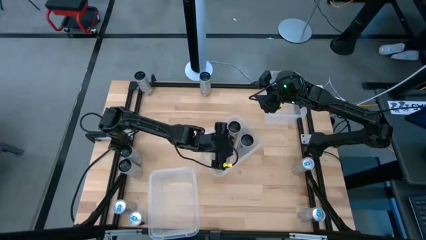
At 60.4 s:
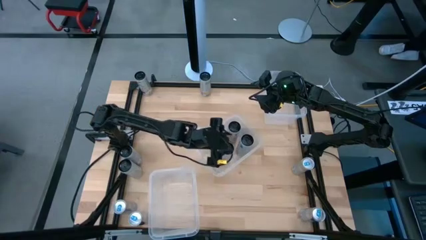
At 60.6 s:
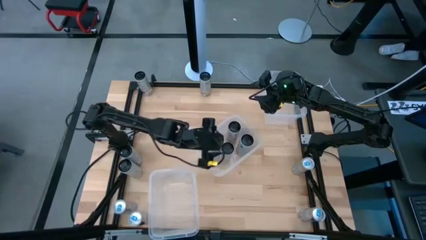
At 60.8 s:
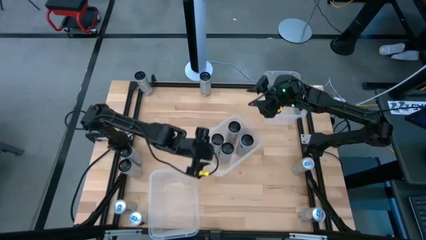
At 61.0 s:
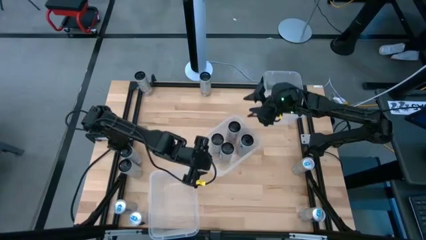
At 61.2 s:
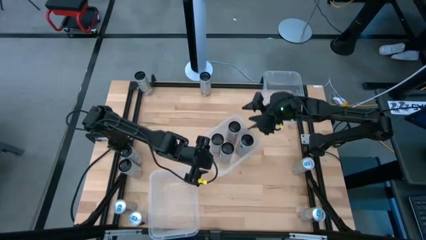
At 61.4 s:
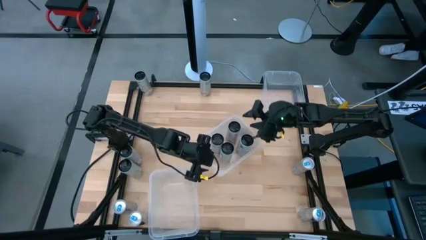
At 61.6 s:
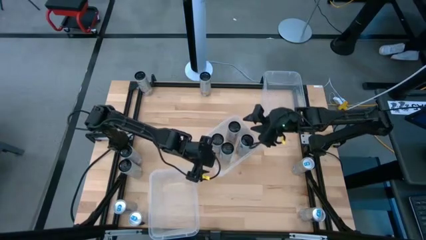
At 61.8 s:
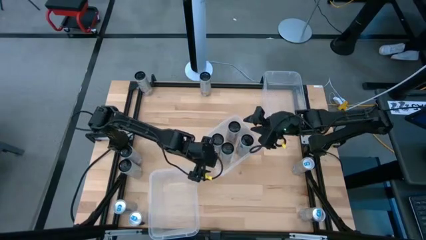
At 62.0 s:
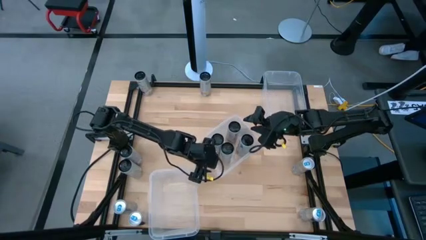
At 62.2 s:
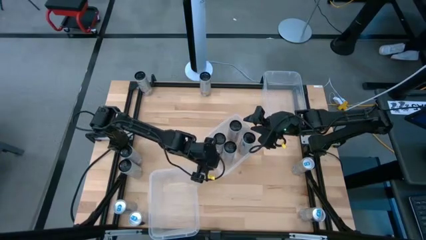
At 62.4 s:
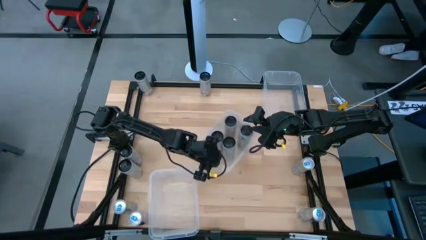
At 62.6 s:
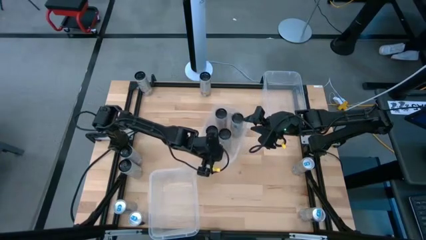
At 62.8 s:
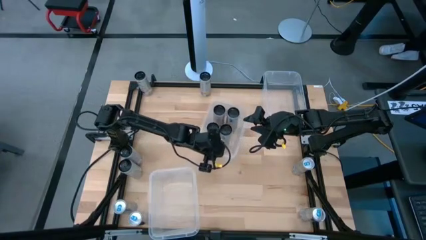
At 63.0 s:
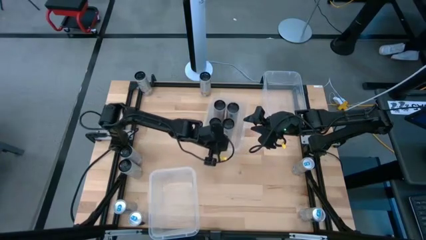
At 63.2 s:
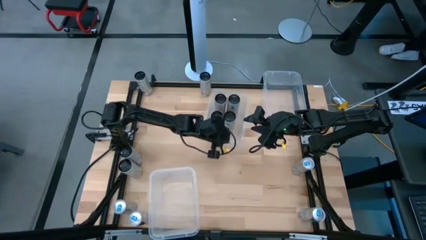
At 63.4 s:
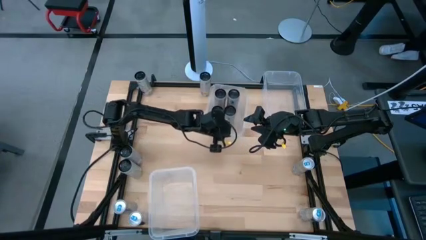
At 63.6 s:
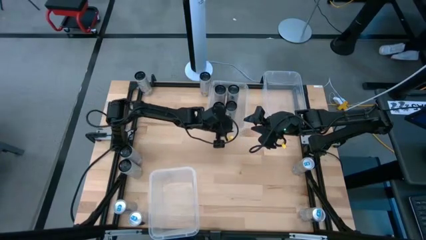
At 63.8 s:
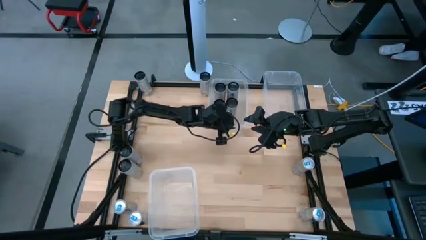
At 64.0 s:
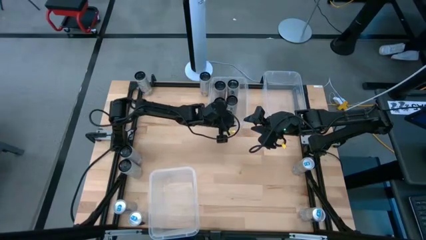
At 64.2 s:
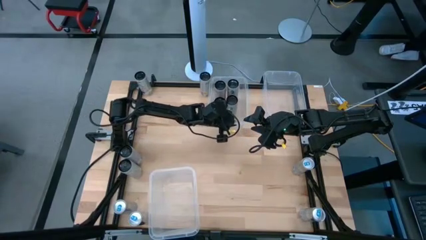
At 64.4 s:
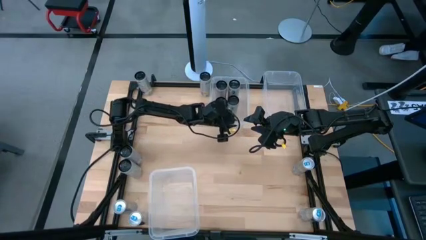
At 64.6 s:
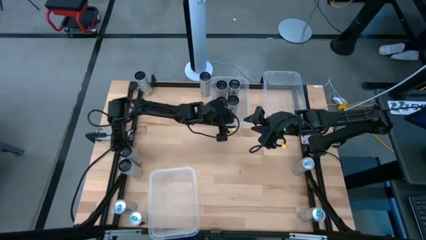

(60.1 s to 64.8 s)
Task: Sort soda cans
Move the middle transparent bin to the top center of the table

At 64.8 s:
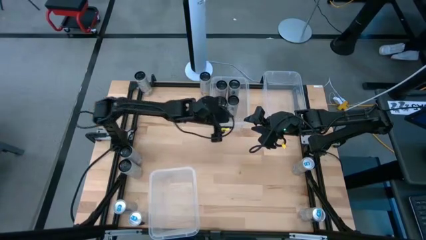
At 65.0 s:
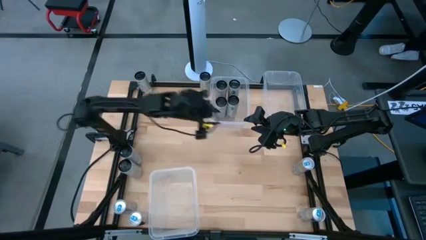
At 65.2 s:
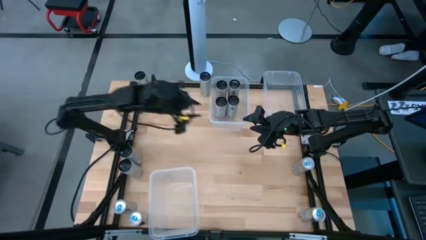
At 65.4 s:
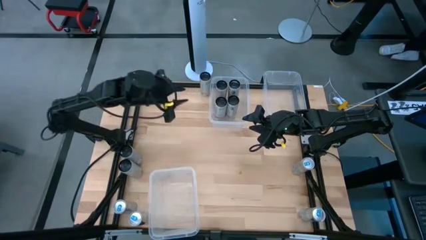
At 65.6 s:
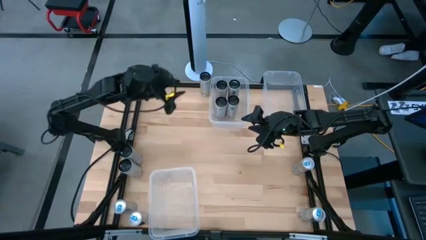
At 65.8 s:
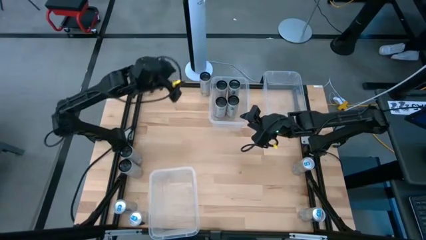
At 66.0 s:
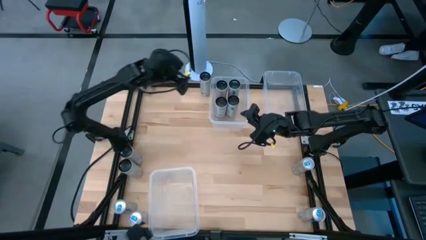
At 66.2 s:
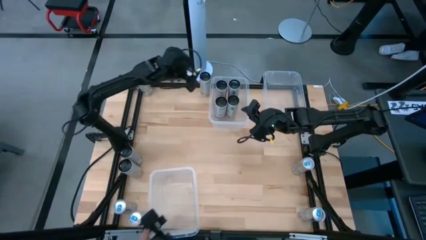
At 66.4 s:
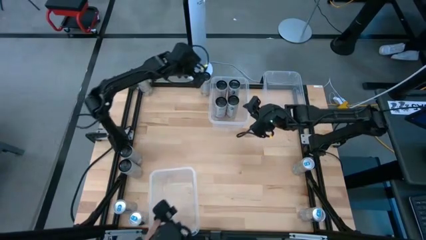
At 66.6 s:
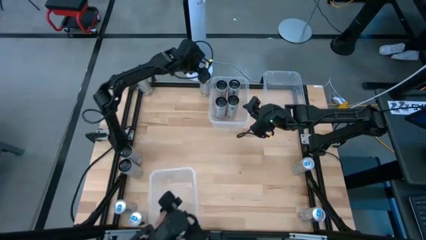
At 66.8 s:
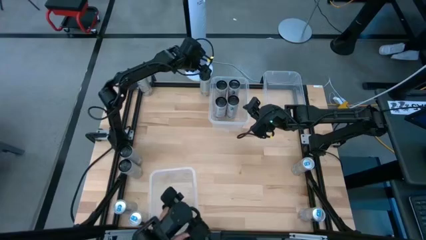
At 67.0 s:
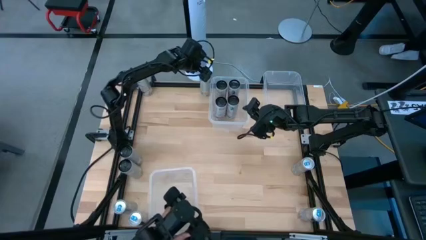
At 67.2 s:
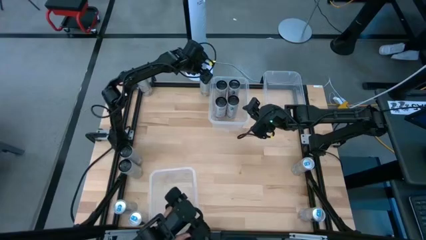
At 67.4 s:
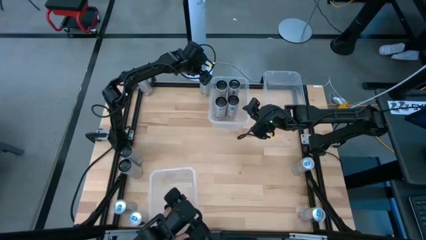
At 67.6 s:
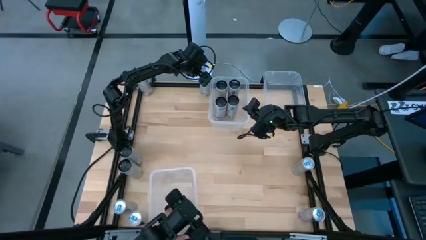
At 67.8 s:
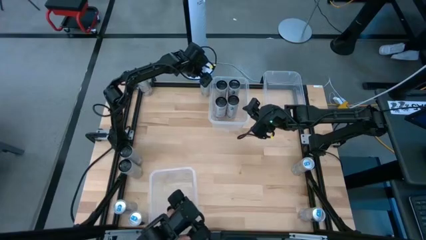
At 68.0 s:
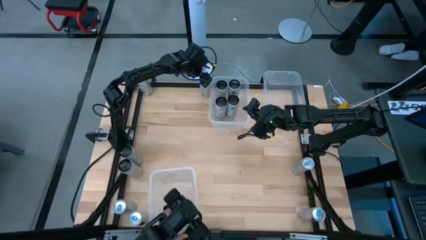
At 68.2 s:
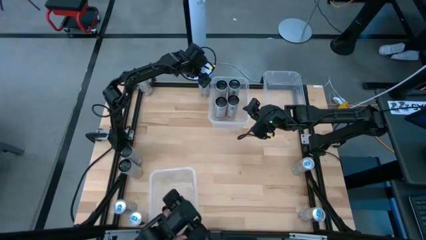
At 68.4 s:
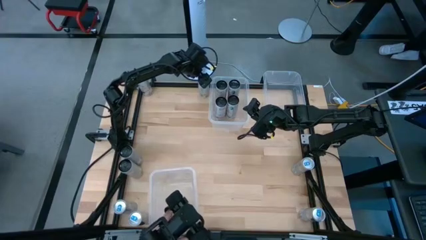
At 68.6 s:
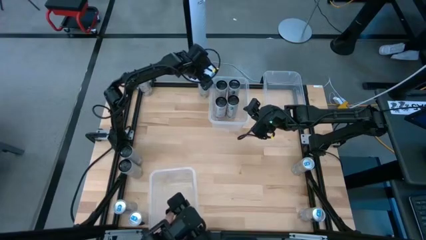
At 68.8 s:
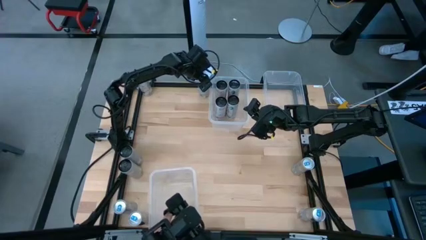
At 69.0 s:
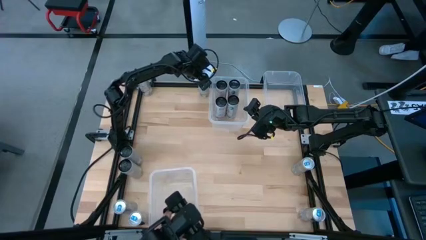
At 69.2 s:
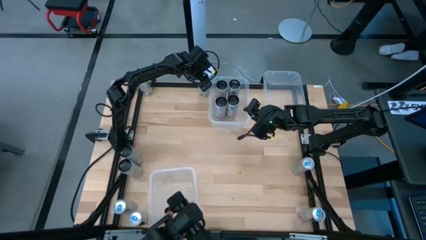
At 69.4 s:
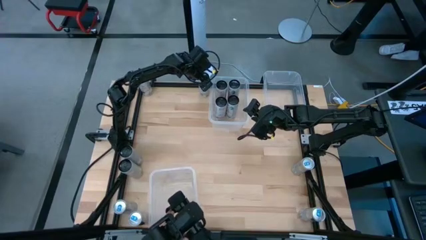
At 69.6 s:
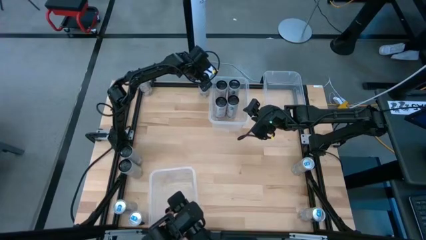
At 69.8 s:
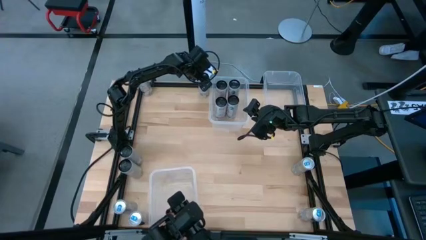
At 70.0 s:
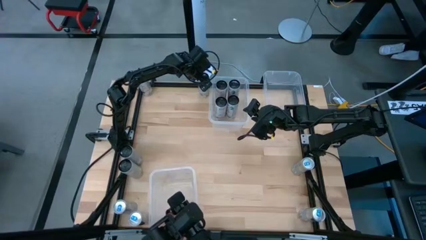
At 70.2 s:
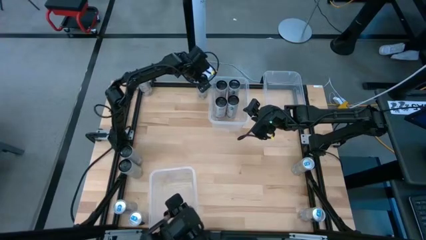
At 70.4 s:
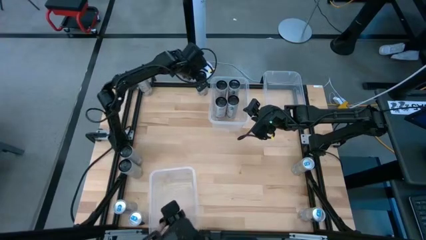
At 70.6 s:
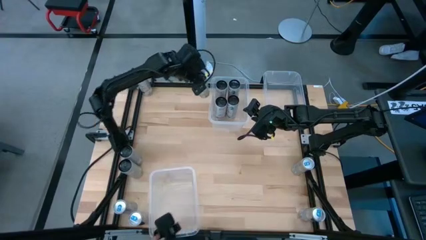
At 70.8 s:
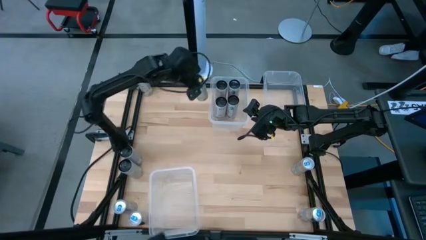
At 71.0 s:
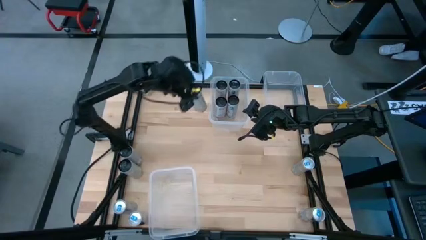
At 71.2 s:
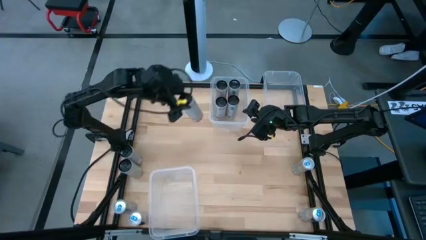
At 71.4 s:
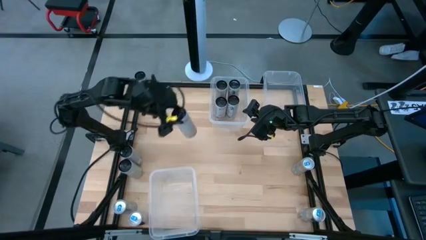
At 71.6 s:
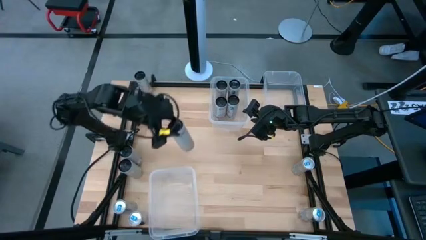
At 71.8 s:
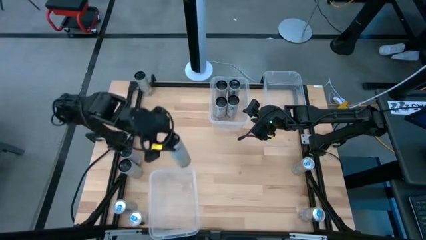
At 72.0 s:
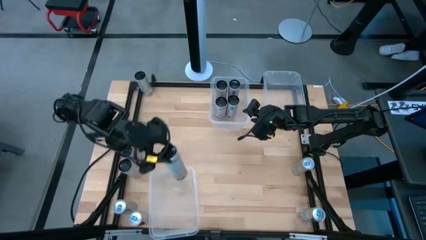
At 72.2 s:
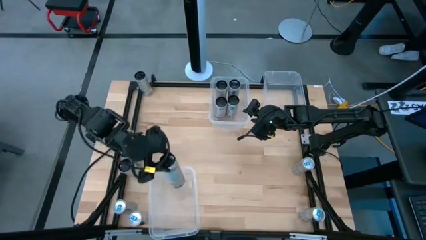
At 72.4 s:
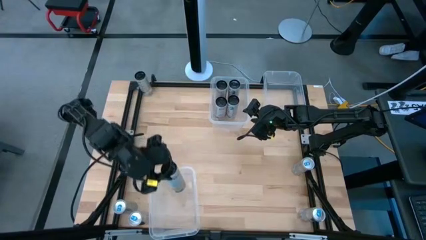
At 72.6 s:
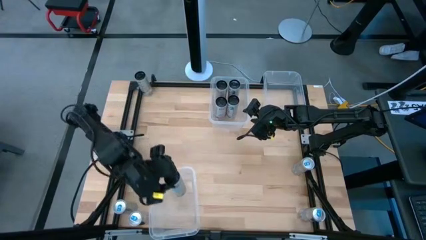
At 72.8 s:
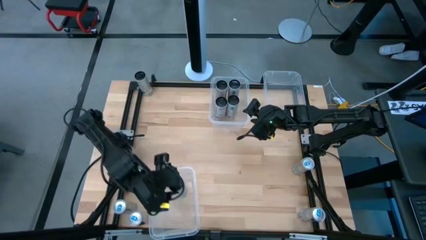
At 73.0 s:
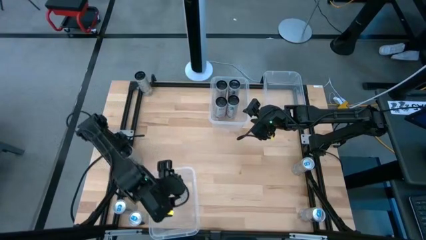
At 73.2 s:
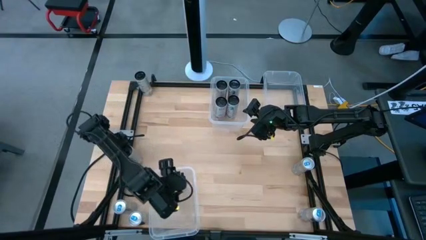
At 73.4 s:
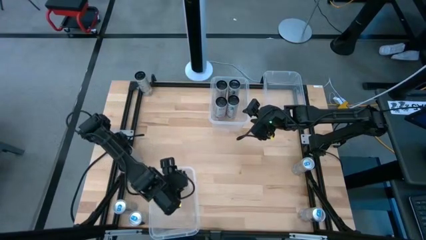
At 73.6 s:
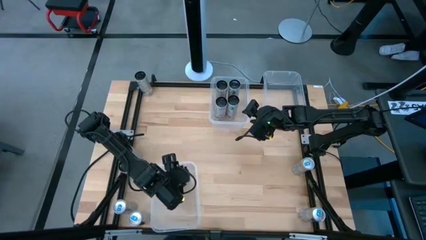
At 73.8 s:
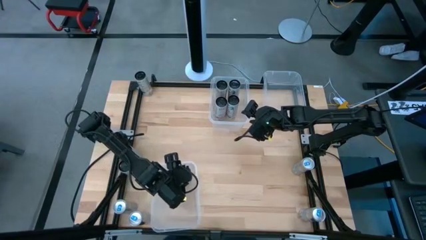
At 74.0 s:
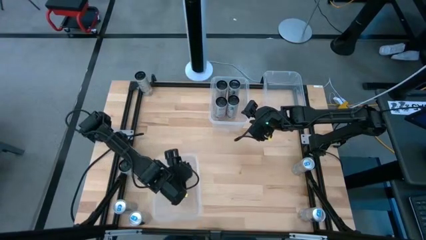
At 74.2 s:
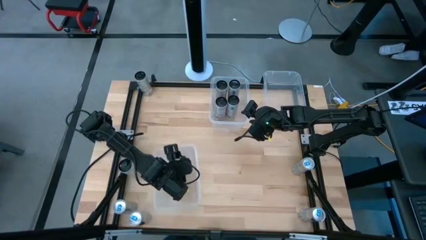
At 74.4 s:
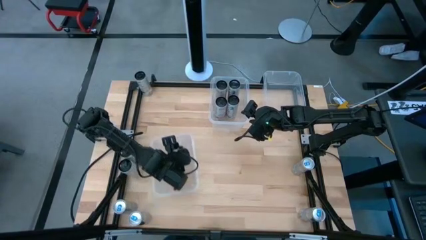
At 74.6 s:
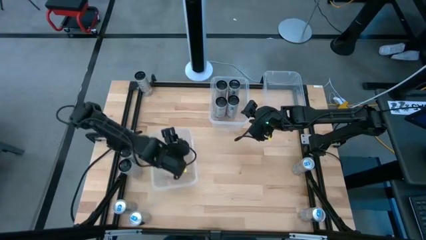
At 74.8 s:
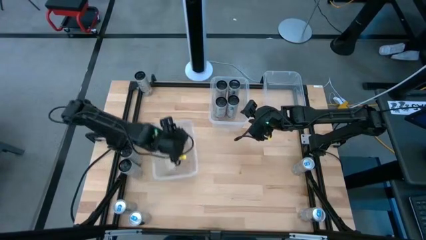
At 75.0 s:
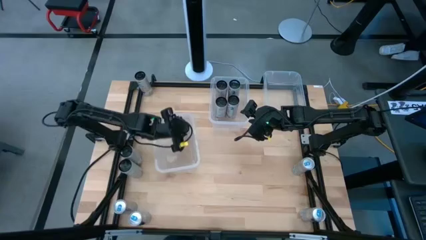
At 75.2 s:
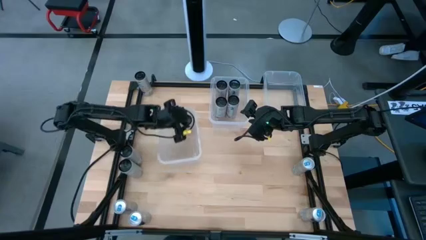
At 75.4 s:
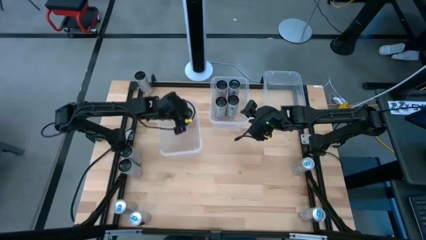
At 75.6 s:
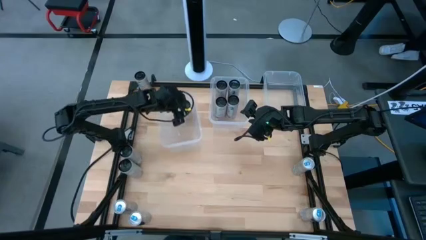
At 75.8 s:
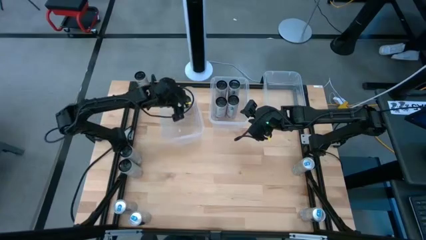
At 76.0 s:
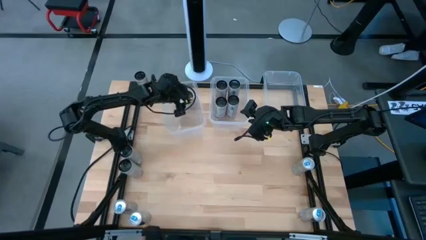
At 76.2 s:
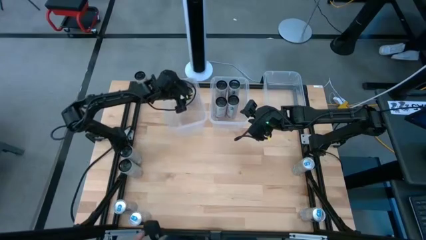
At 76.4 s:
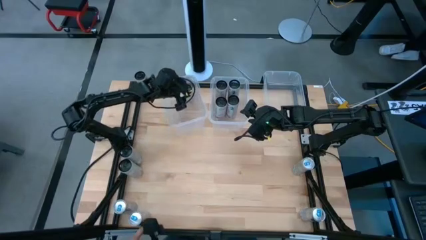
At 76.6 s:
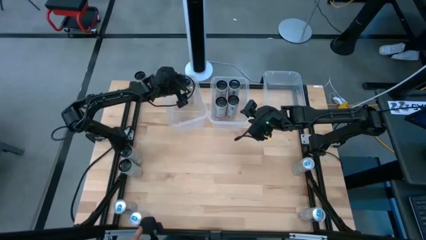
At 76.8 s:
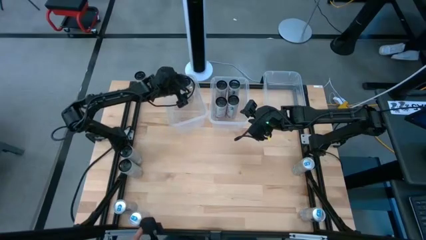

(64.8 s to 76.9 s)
Put the top right white and black starfruit soda can into the left transparent bin
